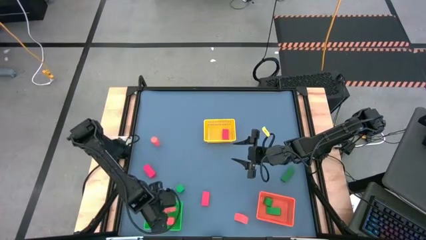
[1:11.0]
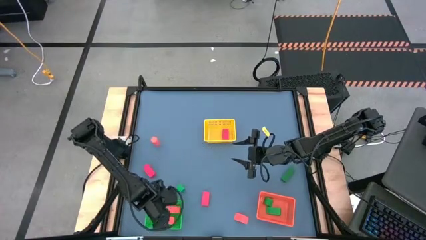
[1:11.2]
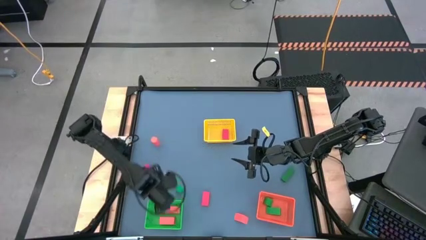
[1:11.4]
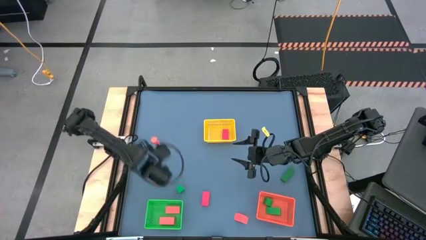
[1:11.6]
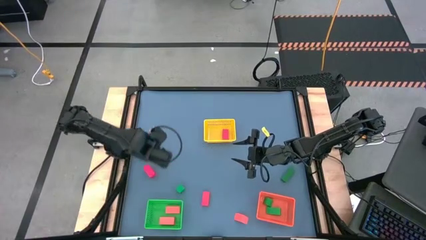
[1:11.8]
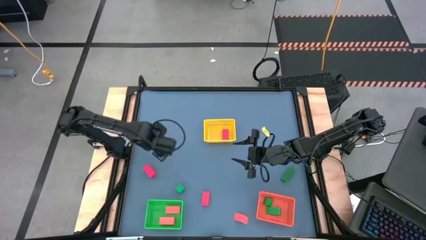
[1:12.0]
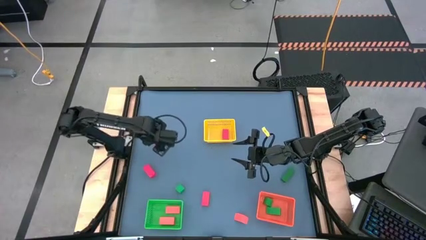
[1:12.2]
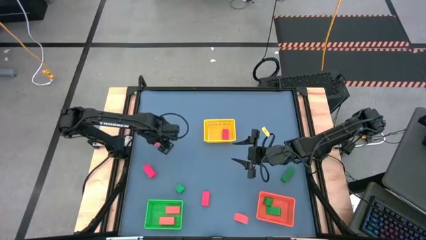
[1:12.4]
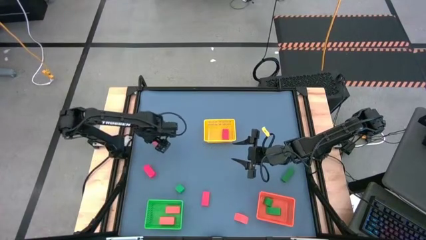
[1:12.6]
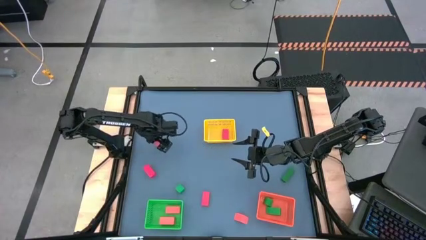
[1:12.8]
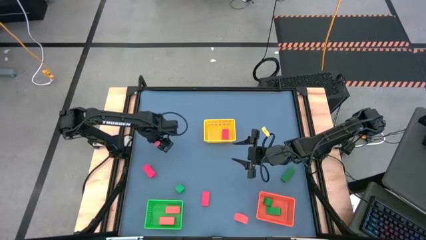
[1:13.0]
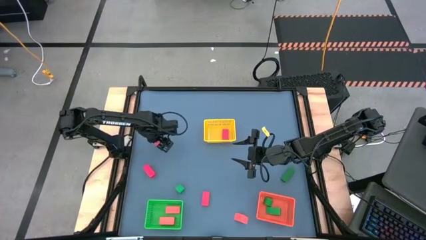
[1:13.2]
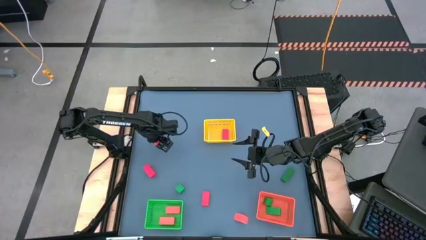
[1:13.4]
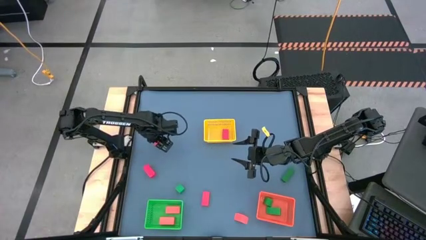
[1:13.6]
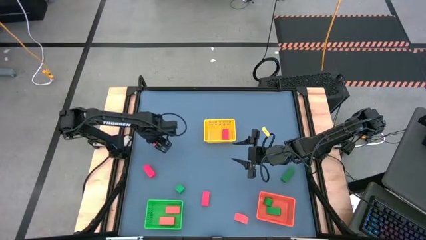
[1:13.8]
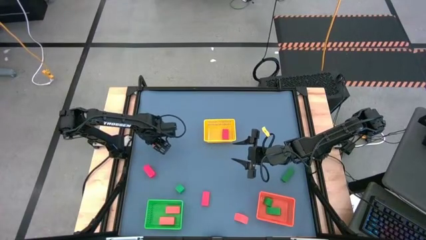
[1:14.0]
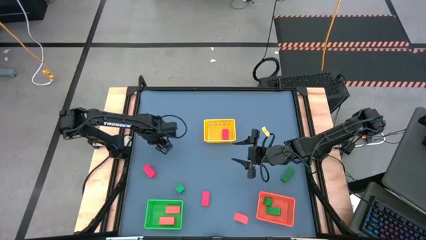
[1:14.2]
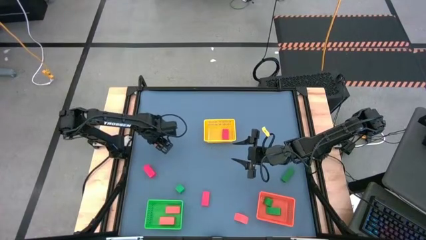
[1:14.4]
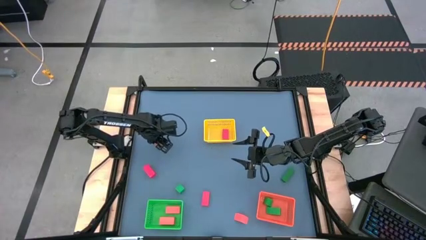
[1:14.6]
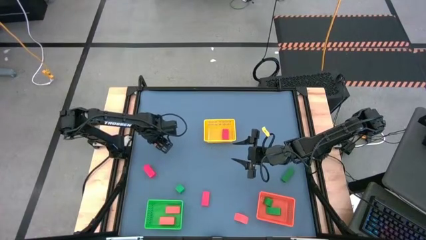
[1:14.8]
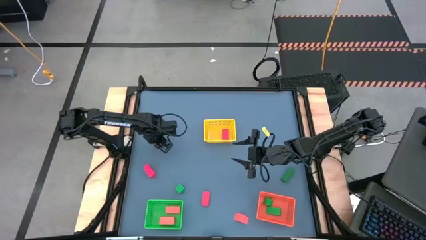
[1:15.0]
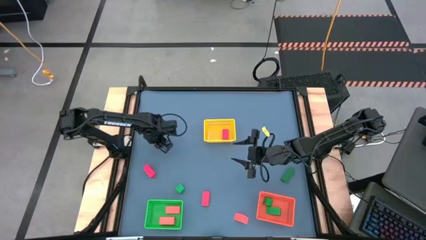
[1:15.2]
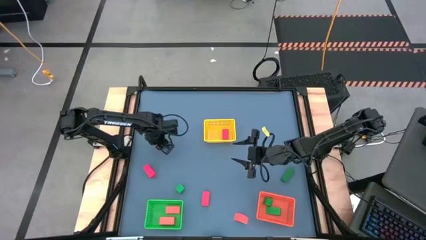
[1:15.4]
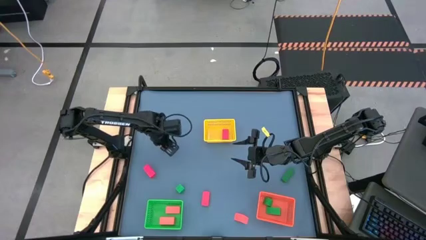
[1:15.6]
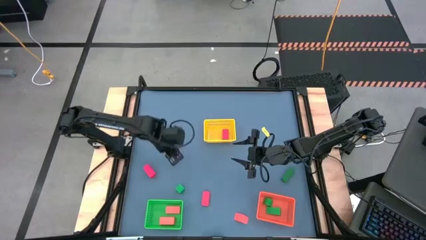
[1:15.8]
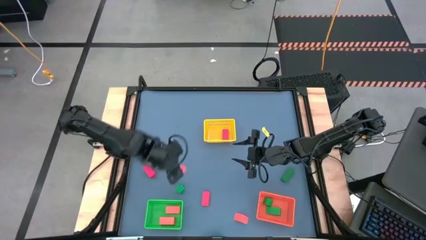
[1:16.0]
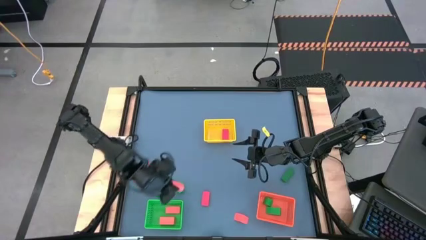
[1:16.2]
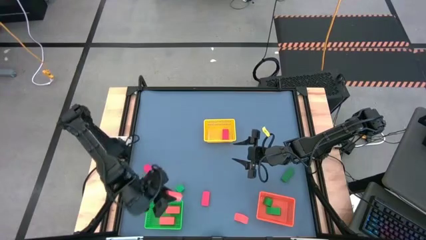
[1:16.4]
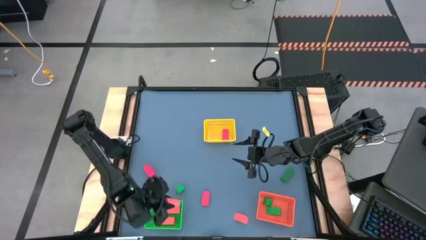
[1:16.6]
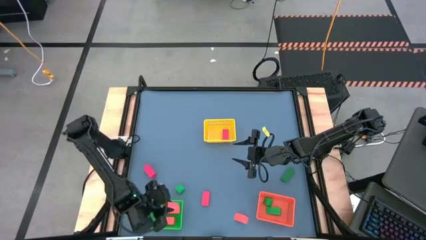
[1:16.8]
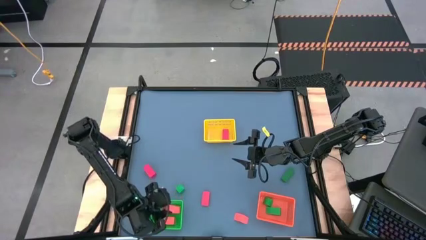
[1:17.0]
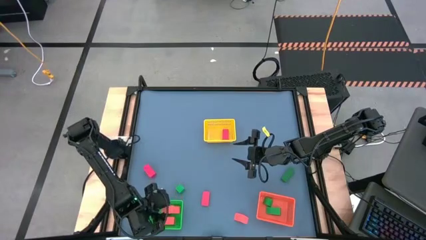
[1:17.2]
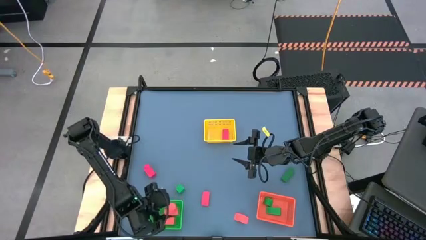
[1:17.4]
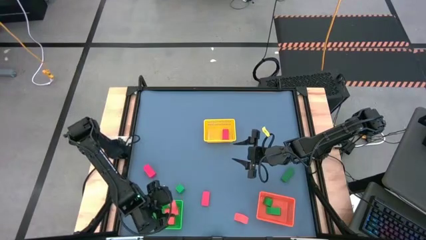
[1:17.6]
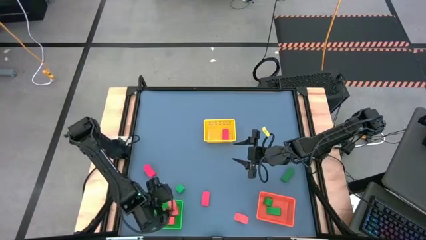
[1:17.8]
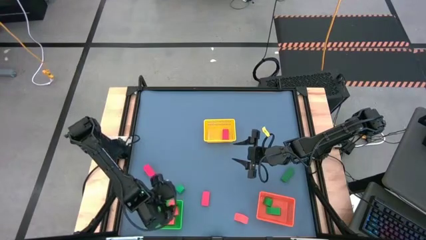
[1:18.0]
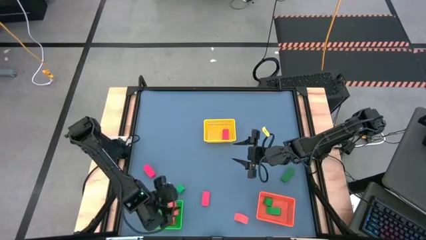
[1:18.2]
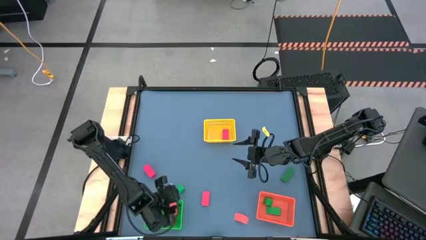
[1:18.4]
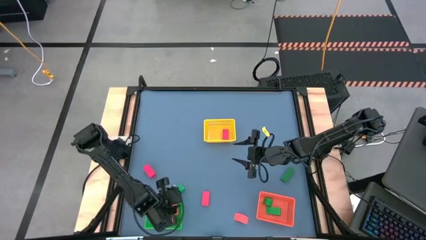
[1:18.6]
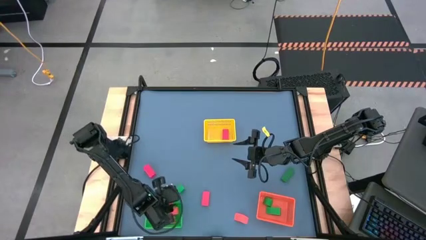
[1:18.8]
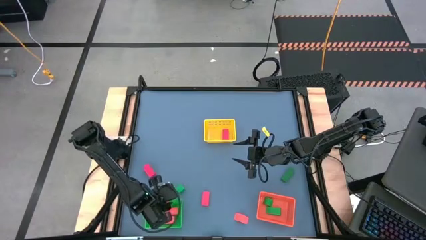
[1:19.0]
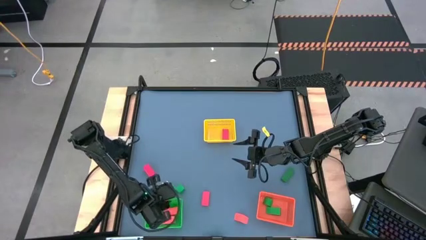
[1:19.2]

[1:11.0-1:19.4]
Task: Sort & place blocks by color
Put the orange block into the green bin

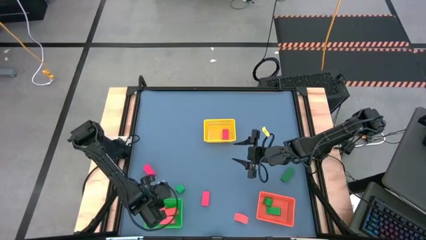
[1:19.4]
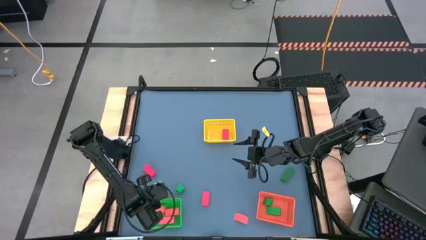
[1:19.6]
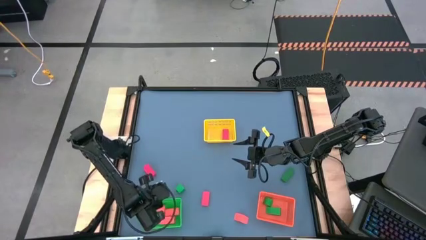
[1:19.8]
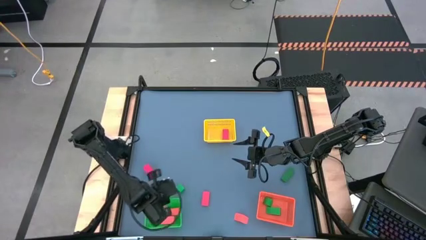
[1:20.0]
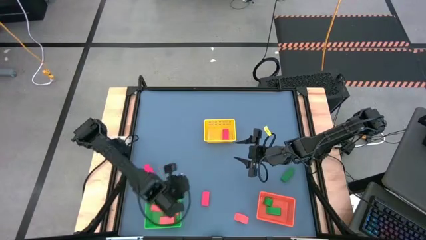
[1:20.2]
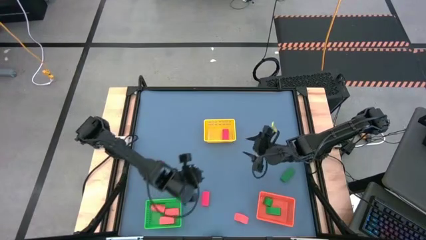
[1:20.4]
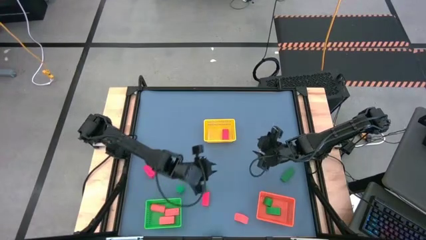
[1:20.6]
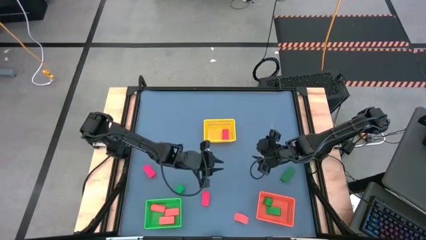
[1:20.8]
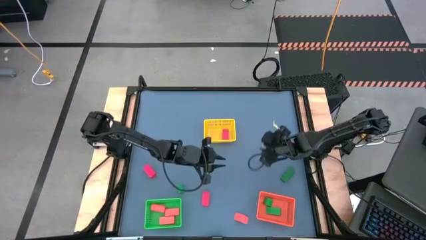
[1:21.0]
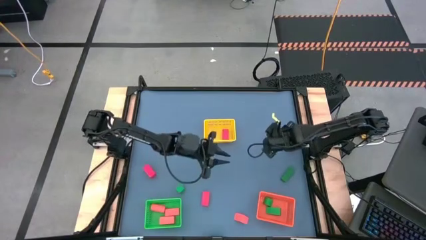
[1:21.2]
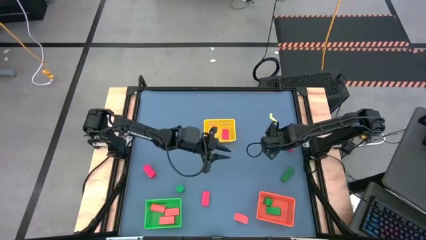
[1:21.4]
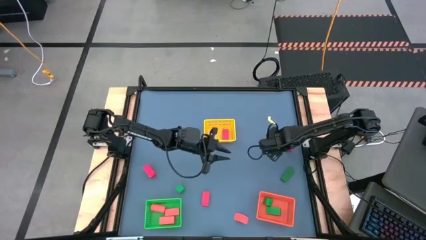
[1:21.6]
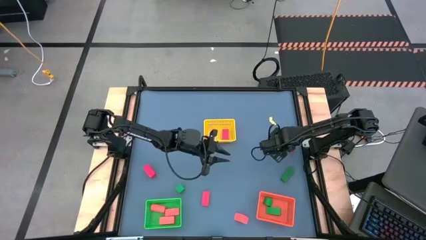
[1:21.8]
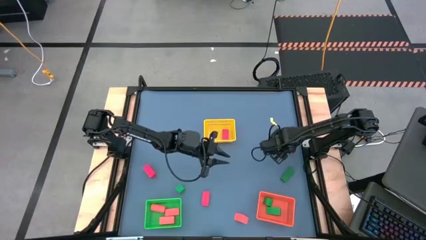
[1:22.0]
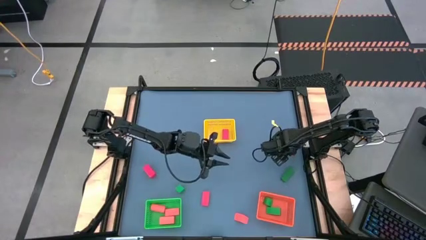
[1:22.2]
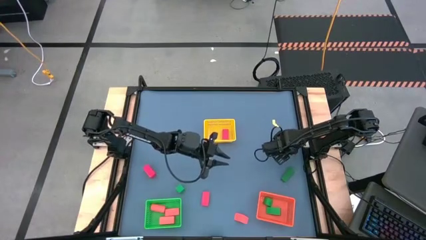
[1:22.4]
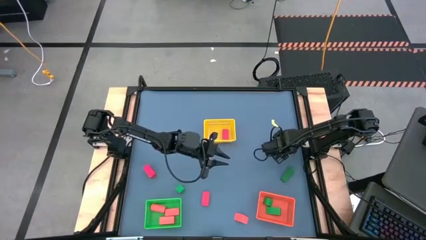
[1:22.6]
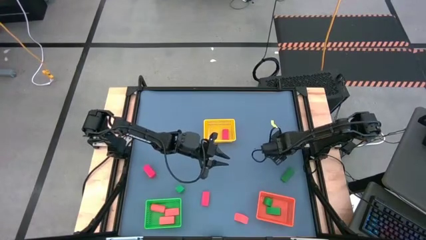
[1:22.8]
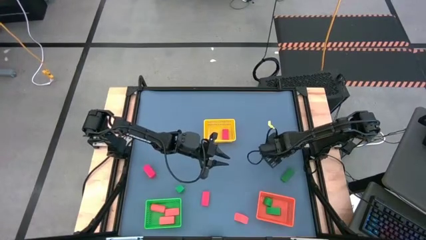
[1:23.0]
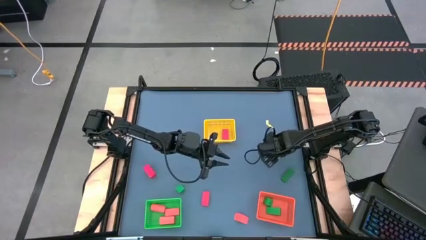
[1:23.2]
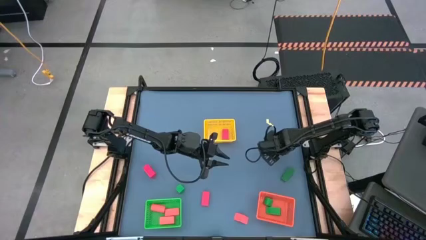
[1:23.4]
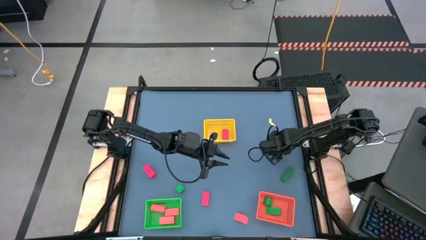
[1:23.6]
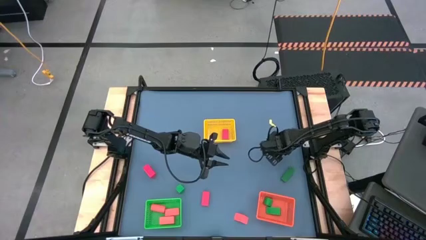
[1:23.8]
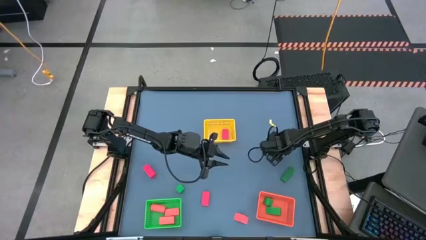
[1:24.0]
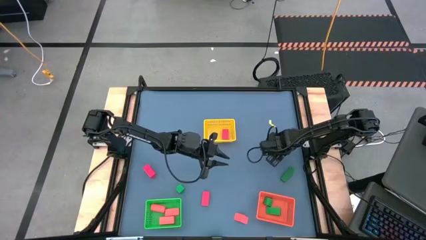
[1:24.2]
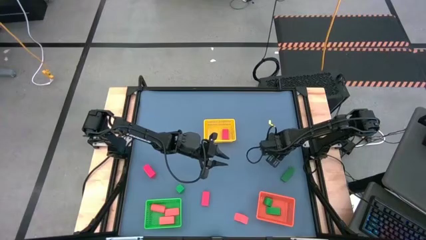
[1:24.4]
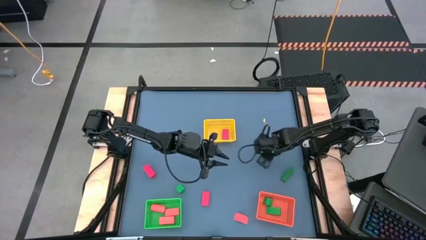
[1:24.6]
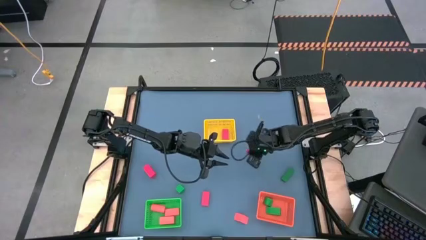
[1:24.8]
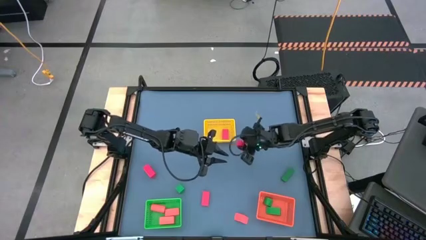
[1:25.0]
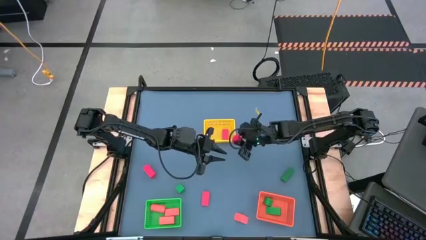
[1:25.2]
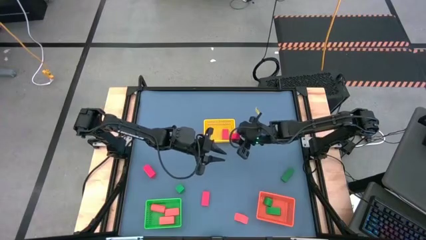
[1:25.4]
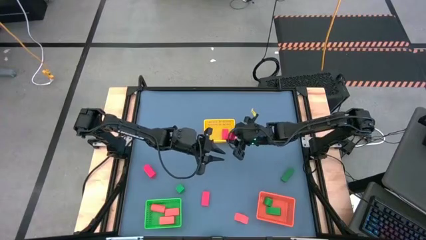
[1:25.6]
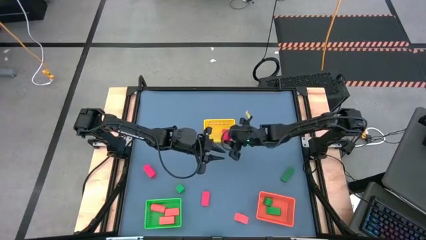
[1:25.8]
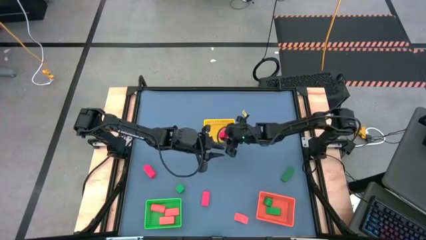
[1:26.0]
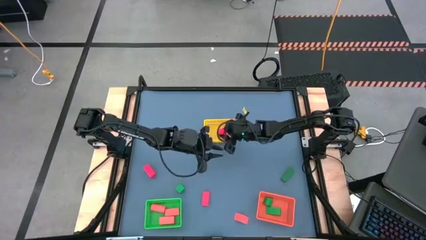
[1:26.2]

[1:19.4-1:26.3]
Put the red block into the yellow bin

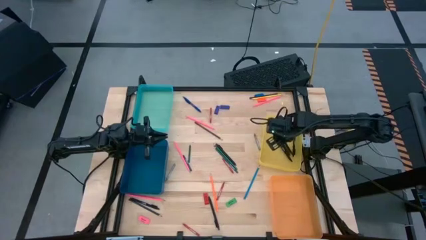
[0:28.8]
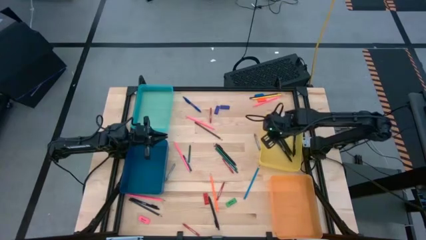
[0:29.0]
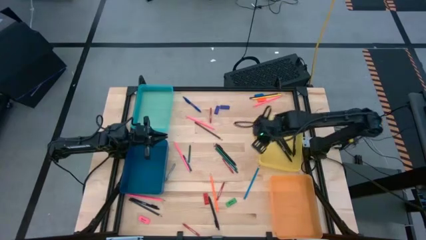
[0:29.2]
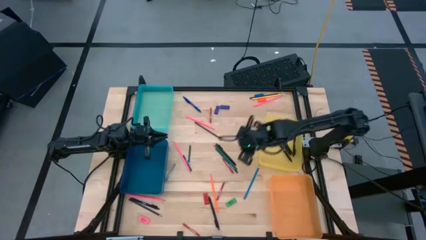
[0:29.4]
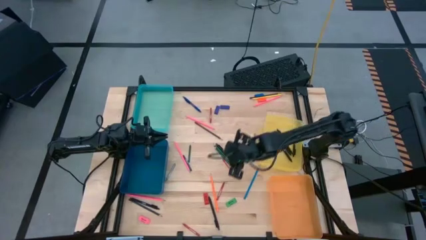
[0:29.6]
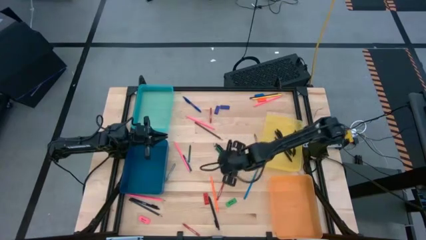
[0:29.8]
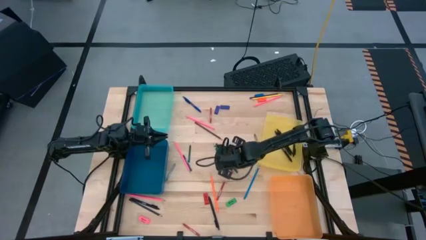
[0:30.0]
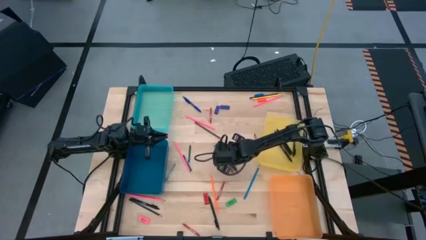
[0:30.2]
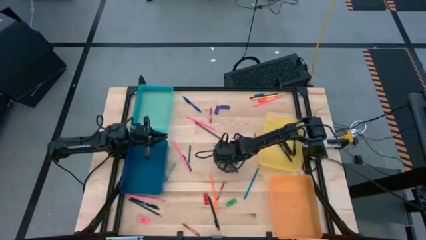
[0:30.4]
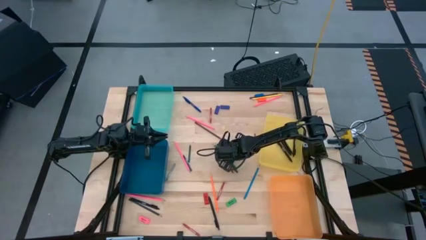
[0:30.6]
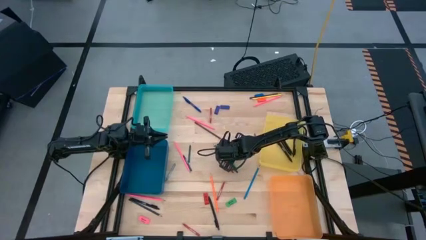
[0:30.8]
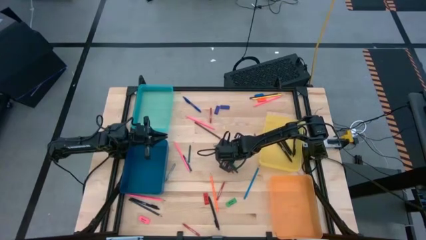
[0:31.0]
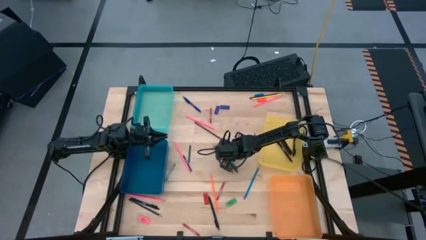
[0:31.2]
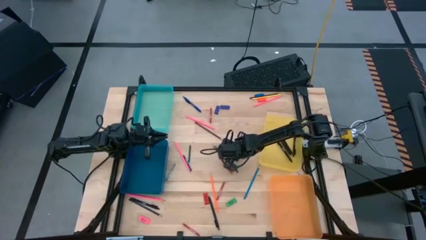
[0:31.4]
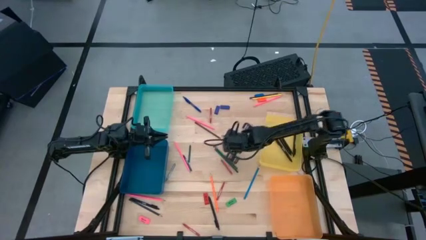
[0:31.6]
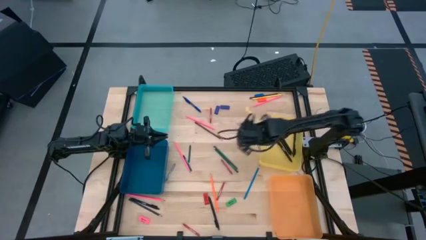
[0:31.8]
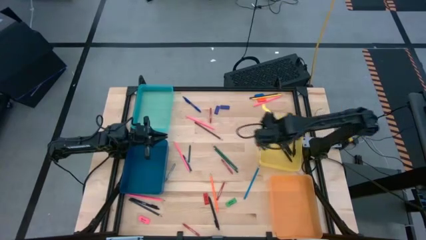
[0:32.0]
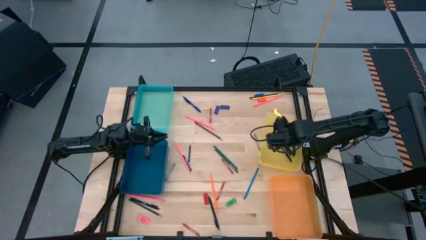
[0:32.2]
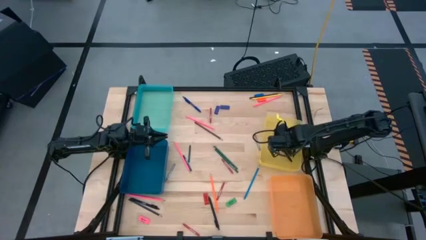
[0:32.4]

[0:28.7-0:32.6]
Task: Sort crayons/erasers/pens/pencils in bins
Put the black pen into the yellow bin
